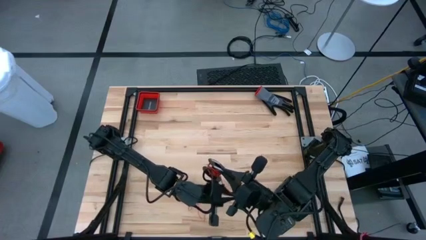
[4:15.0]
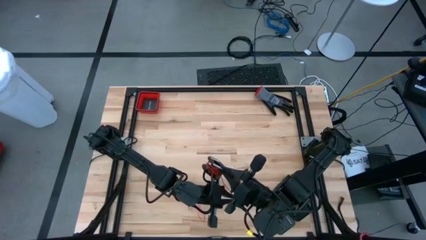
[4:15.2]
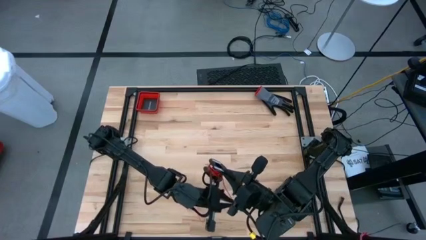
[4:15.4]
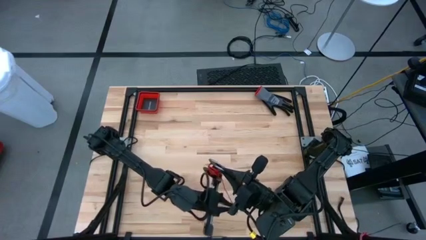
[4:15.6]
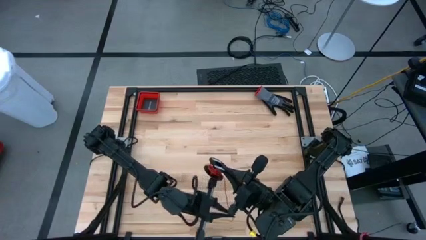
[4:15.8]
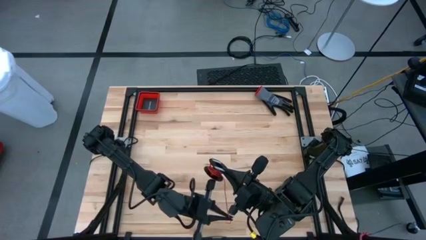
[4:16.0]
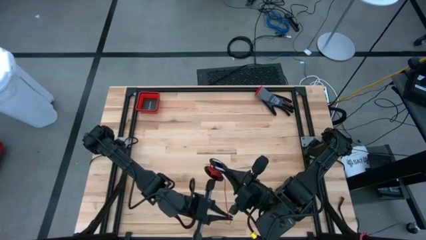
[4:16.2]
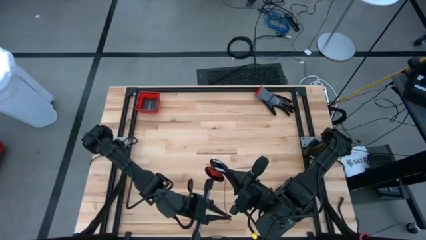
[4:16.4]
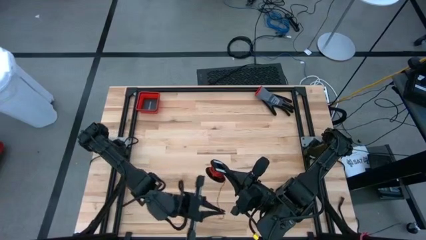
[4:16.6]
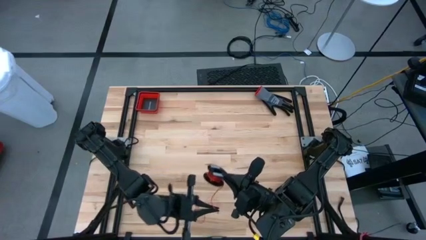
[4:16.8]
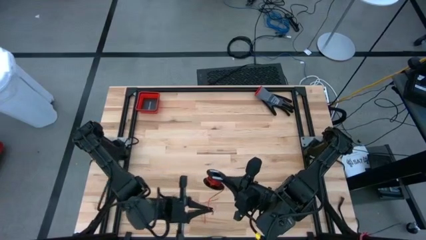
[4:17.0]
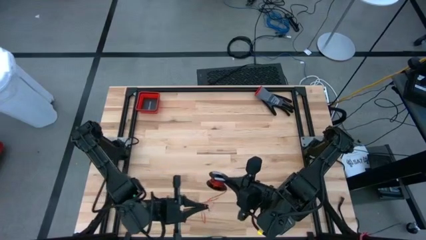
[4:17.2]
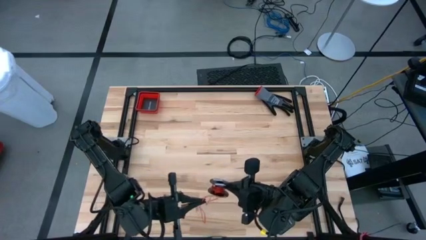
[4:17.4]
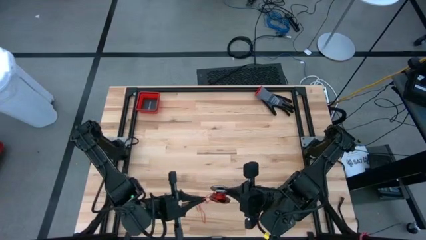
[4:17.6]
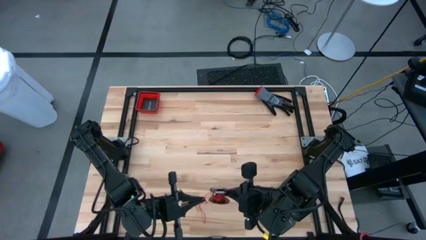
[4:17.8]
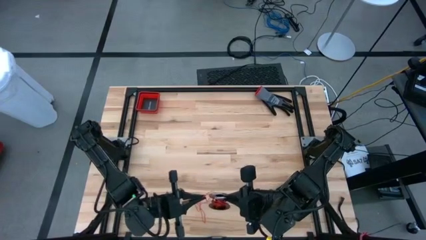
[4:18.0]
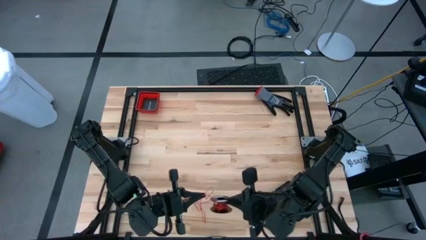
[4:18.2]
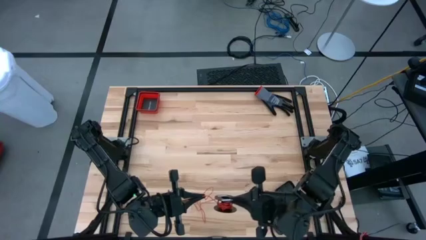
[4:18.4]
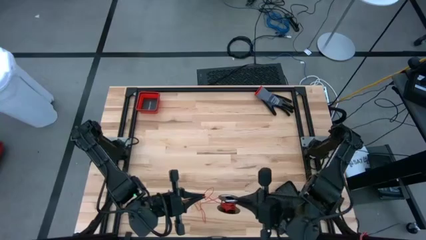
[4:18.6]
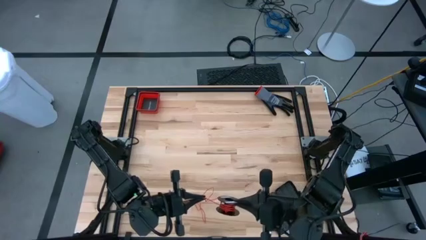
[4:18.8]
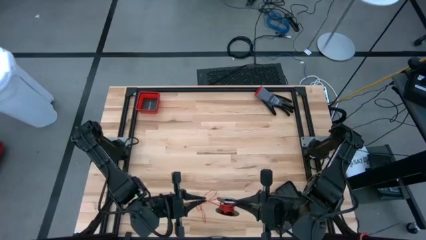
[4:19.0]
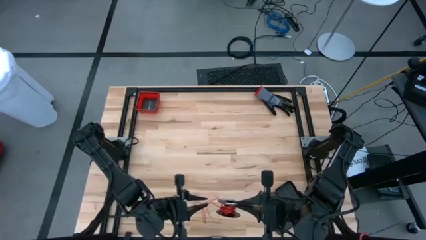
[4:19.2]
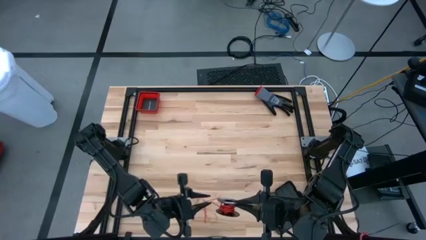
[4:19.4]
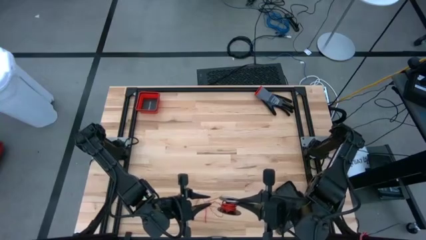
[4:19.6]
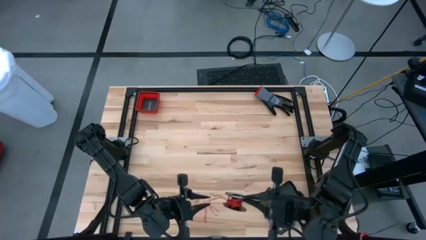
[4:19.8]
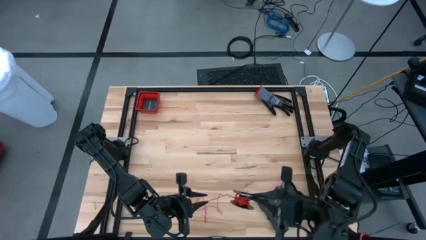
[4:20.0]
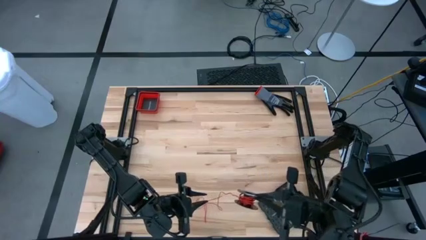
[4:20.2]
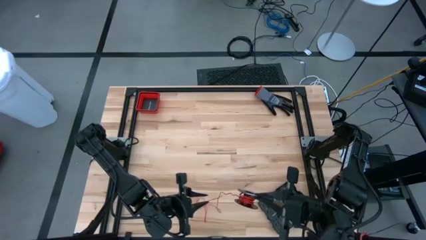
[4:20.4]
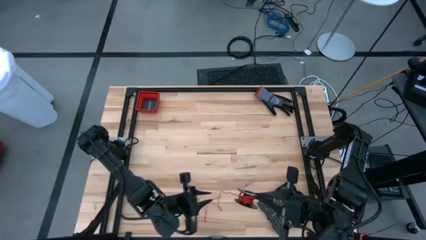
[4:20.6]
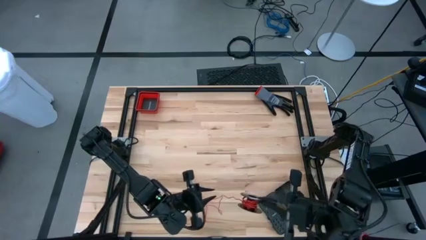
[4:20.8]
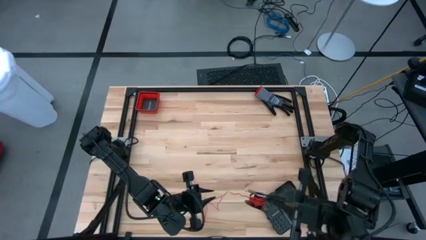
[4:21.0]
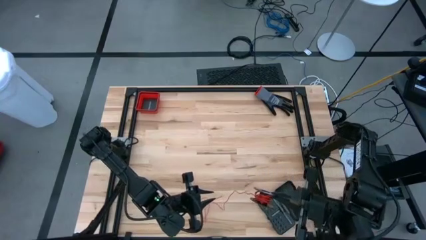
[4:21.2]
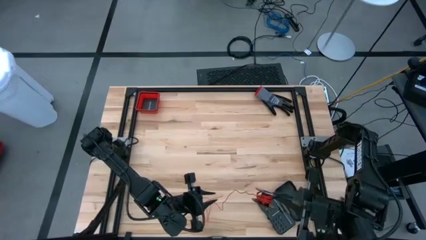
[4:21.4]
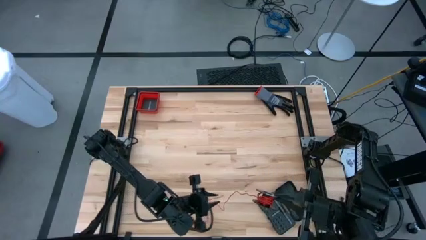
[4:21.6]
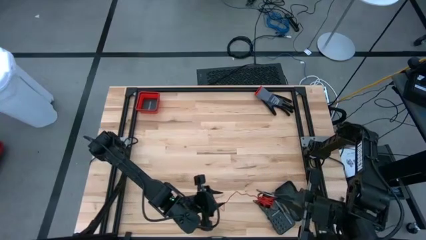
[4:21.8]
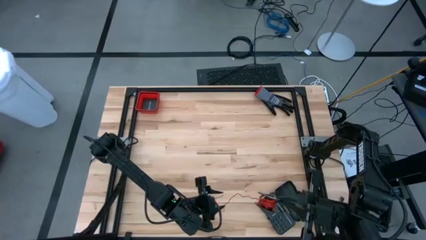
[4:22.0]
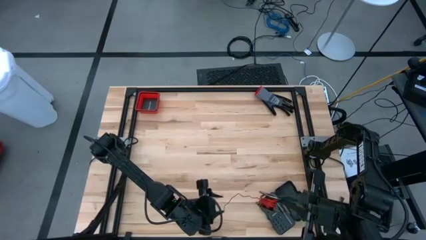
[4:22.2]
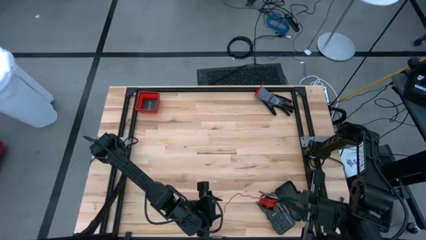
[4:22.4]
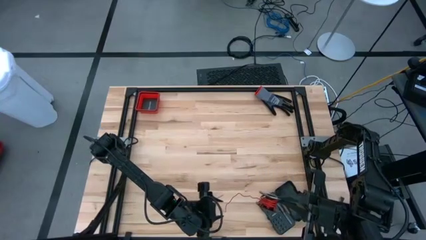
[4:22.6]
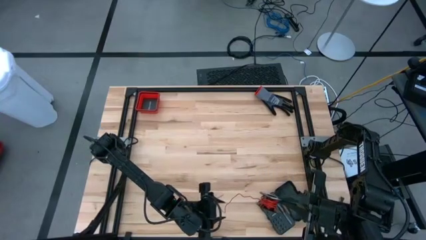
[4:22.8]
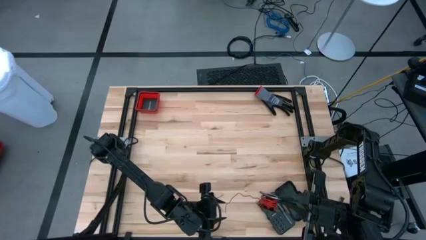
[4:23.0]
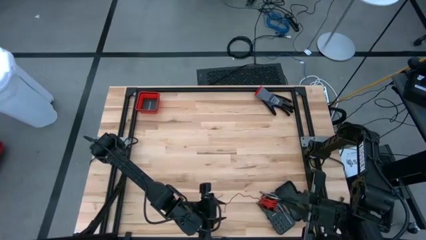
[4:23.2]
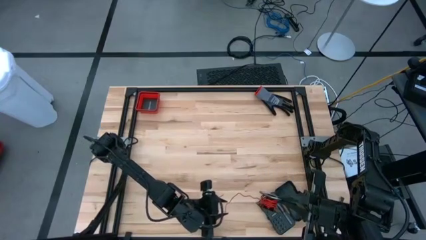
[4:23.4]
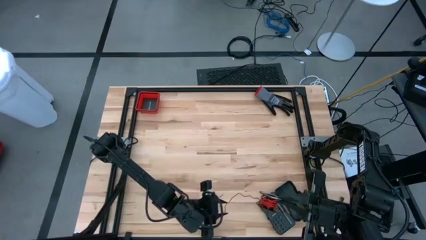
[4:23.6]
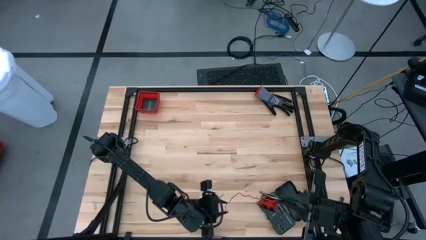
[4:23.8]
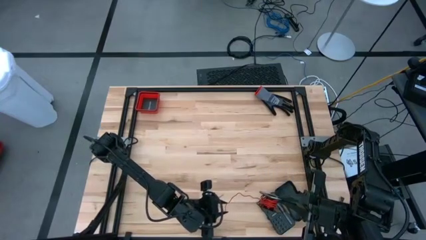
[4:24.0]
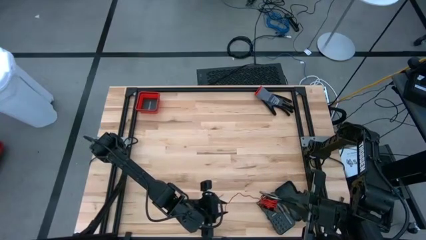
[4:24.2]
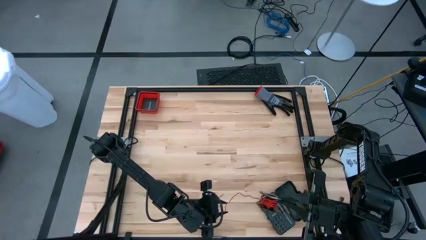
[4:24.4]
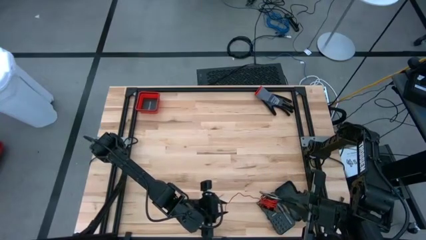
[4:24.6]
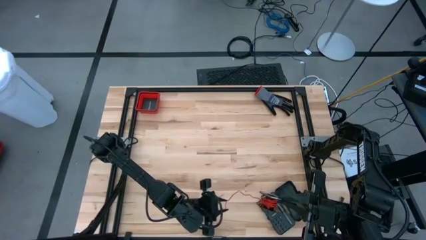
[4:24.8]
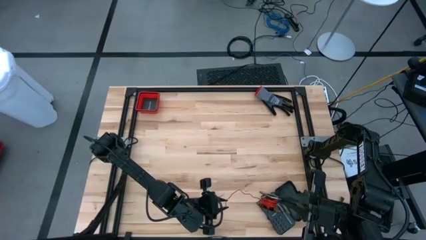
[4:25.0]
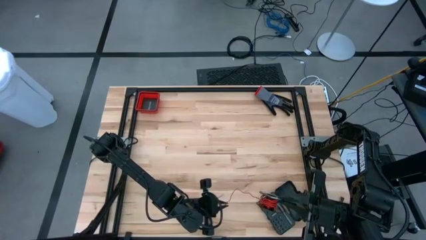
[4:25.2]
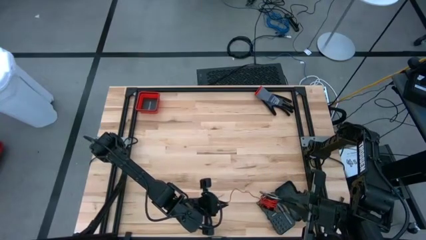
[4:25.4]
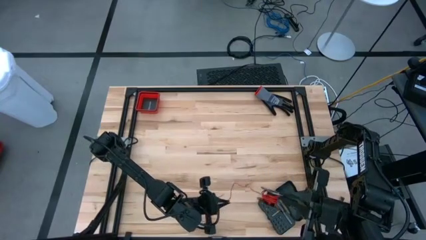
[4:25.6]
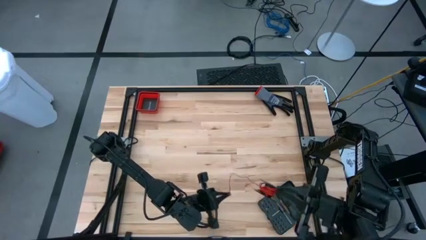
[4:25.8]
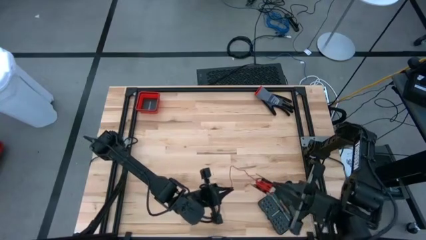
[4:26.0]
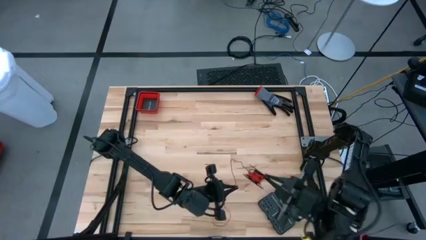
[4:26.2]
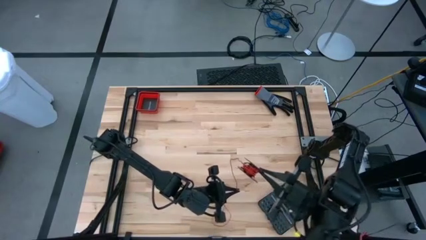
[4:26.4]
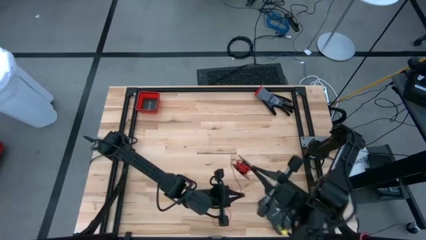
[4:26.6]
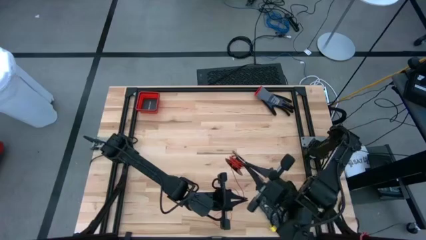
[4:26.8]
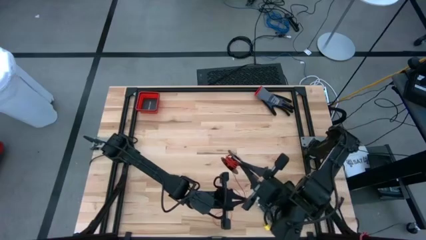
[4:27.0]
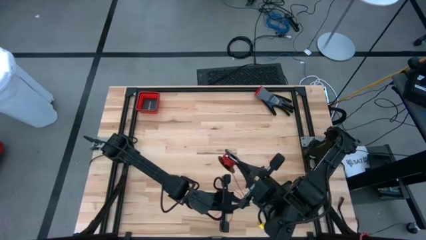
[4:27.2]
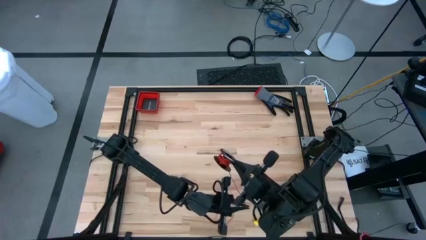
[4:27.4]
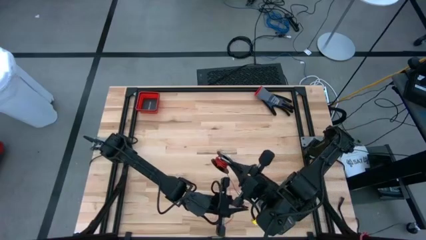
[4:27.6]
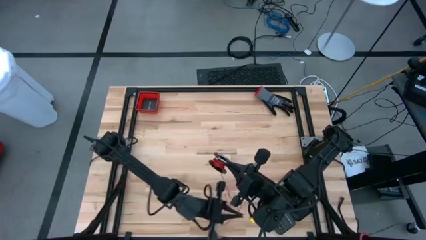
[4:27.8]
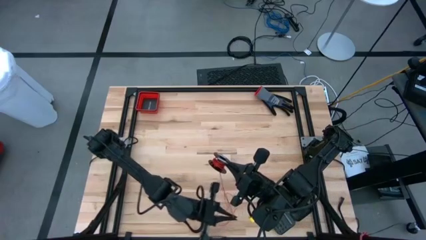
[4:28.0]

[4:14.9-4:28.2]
Task: Coil cords
Coil the red wire onto the spool

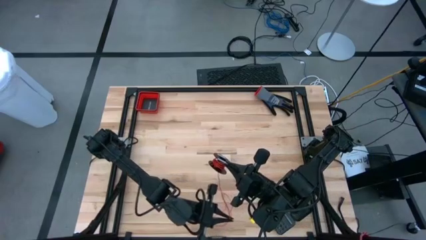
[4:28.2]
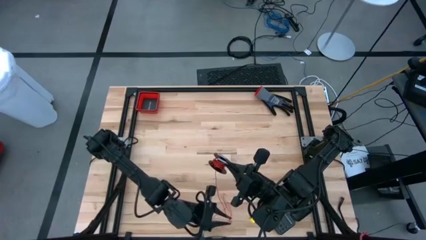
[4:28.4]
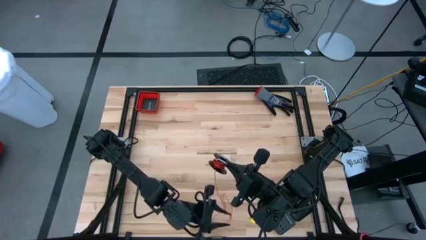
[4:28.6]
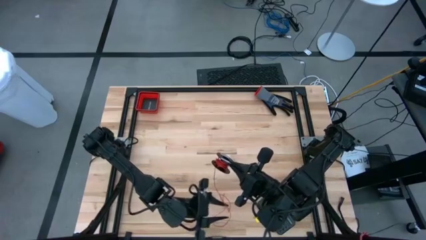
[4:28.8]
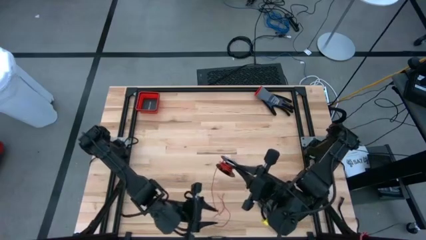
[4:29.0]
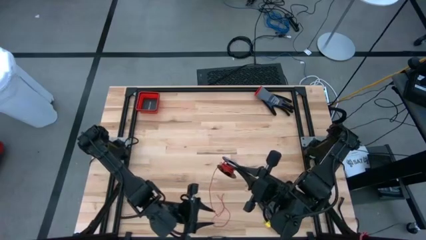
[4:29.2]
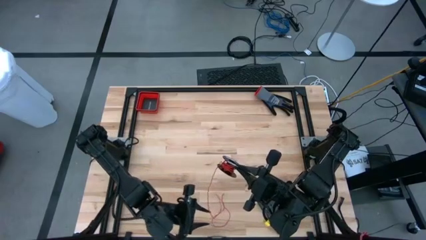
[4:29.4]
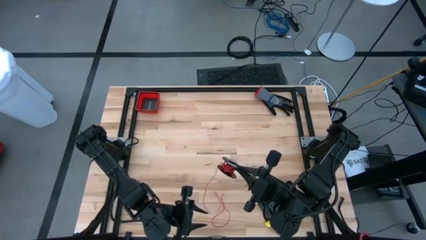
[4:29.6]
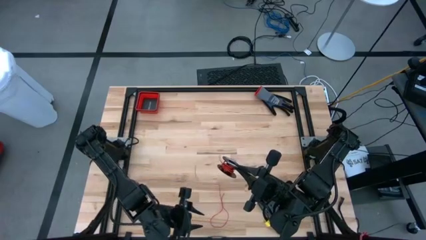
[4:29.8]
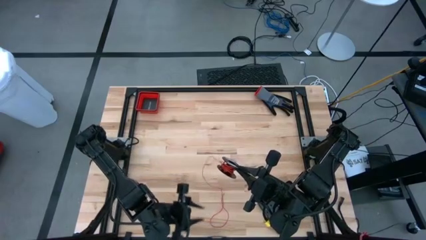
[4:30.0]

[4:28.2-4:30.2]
Coil the red wire onto the spool
